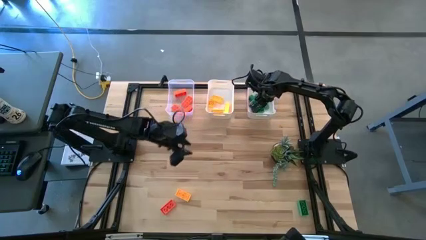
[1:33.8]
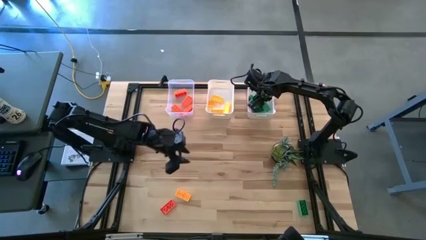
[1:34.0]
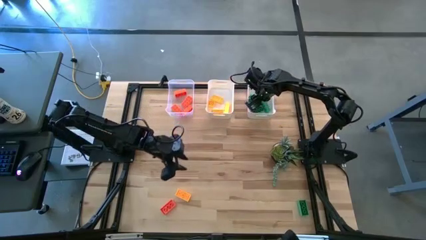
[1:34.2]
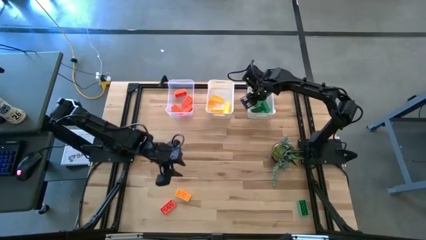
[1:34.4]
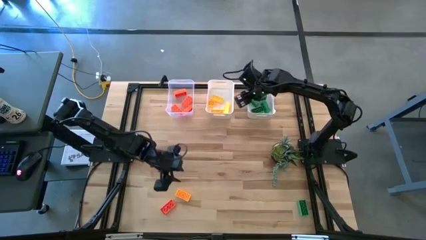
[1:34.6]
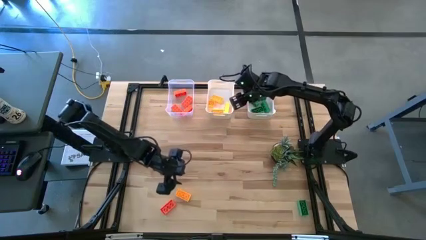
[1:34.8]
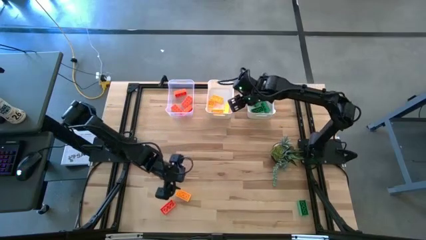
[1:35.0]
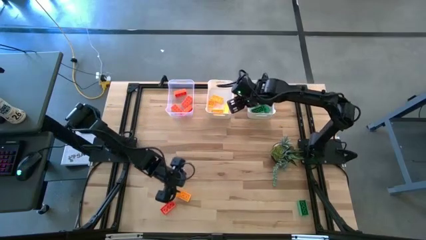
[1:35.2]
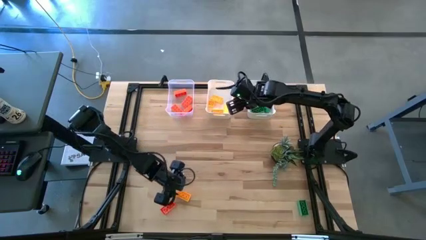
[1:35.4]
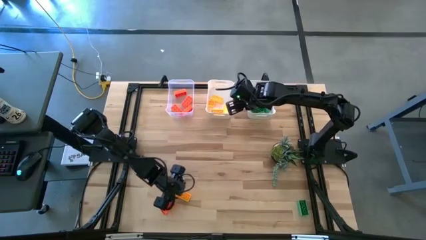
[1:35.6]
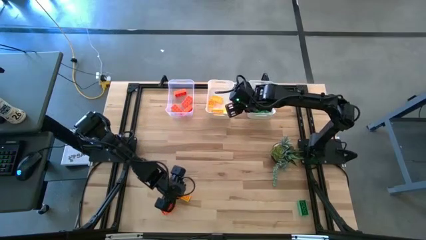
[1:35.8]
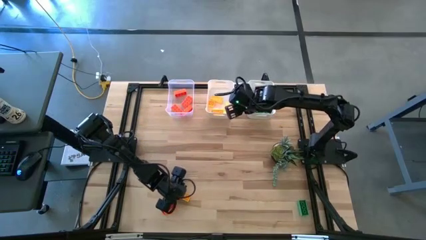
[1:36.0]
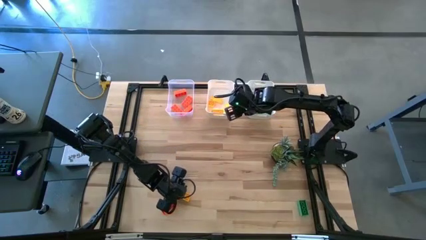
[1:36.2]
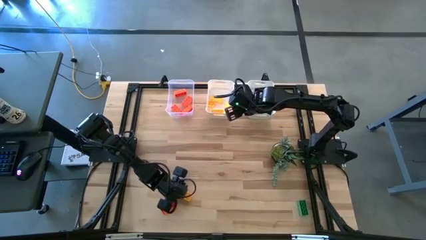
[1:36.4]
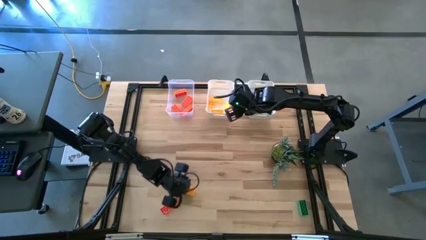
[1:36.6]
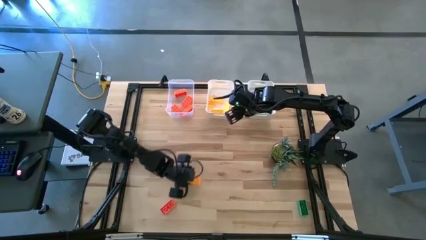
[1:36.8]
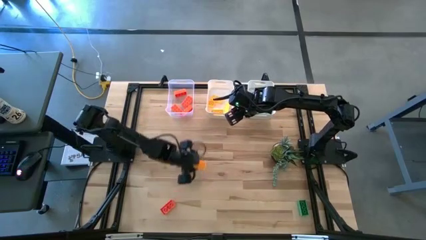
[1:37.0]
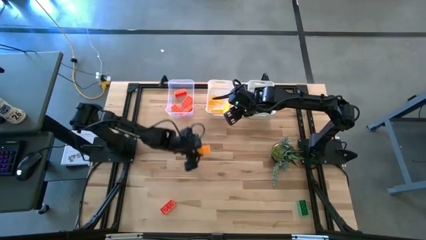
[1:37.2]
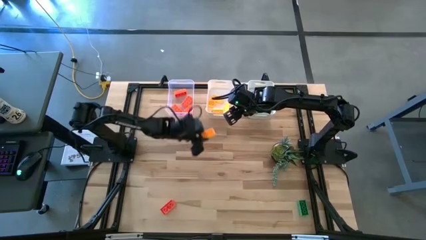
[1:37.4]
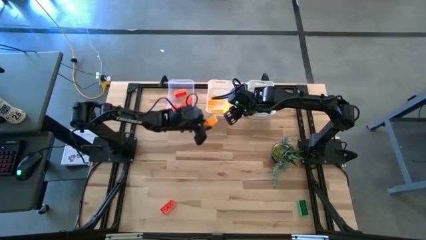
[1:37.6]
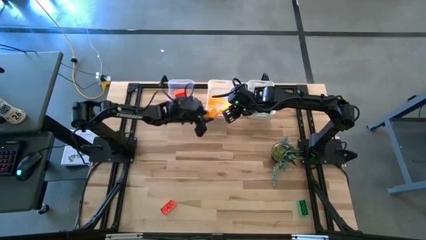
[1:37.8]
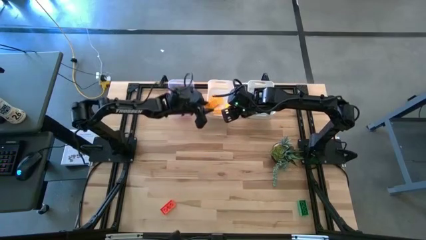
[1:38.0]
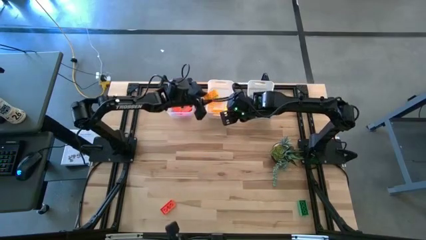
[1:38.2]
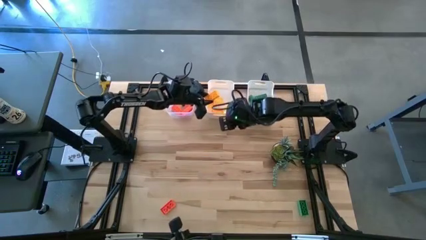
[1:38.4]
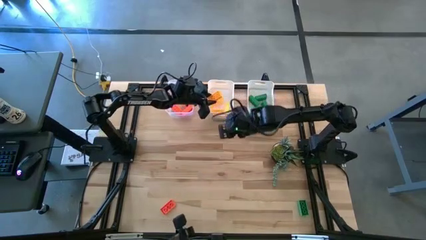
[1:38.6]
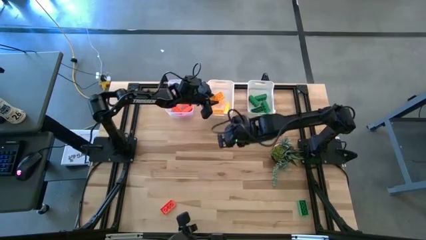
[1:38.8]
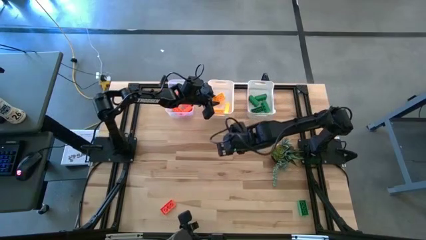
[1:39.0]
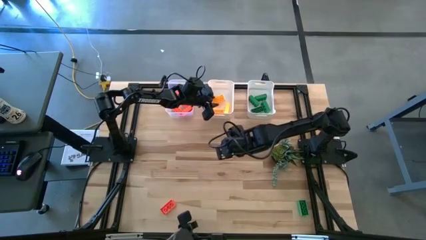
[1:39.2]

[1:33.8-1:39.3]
Task: Sort & place blocks by color
Put the yellow game piece into the left white bin

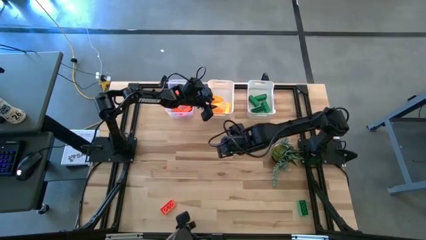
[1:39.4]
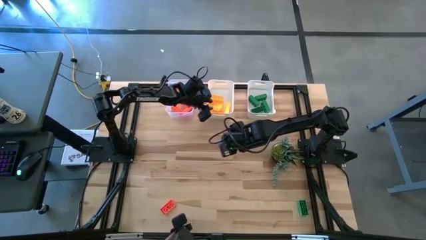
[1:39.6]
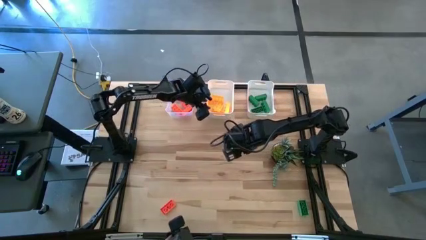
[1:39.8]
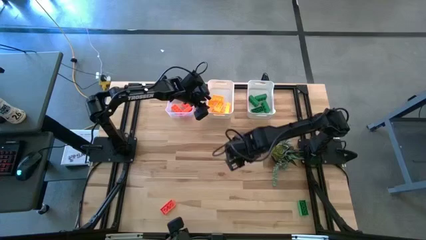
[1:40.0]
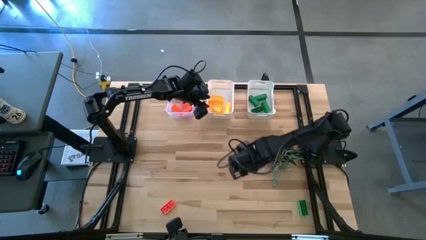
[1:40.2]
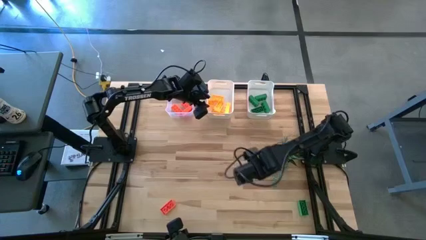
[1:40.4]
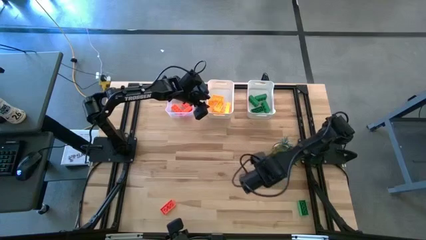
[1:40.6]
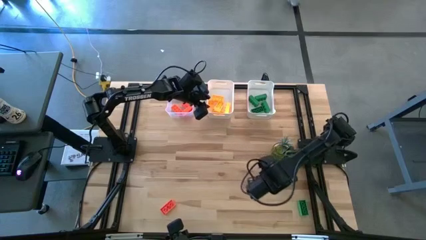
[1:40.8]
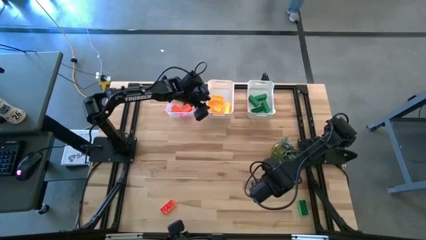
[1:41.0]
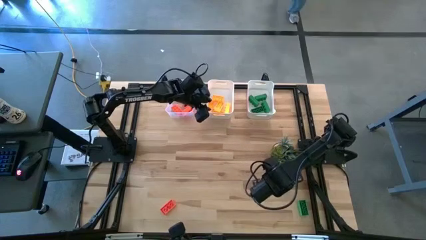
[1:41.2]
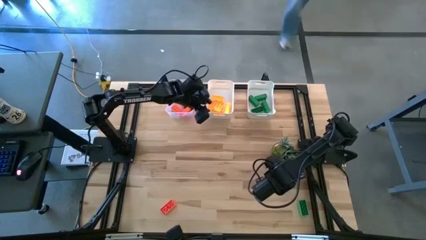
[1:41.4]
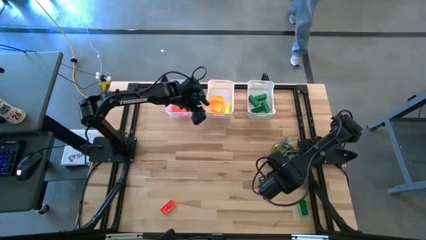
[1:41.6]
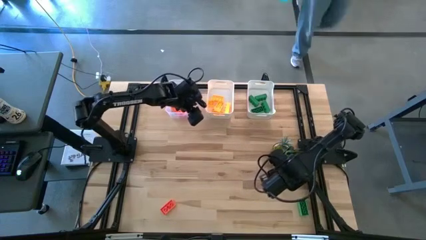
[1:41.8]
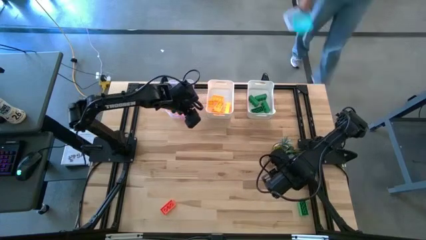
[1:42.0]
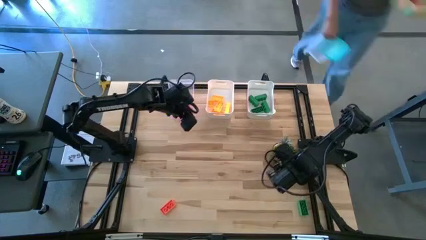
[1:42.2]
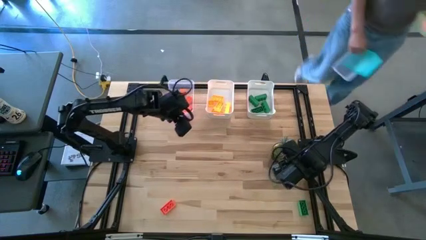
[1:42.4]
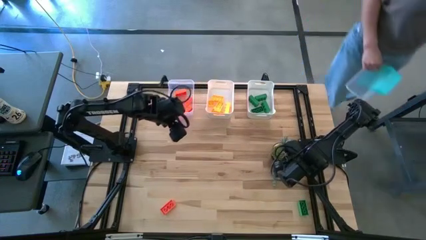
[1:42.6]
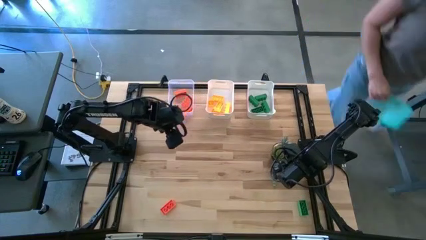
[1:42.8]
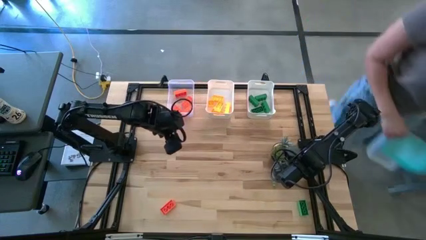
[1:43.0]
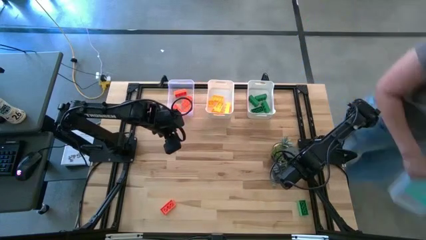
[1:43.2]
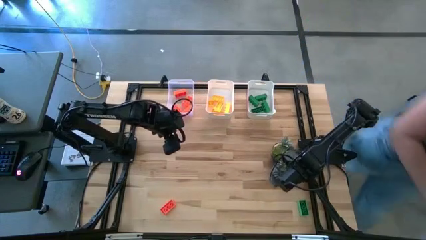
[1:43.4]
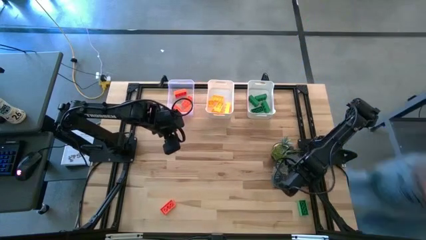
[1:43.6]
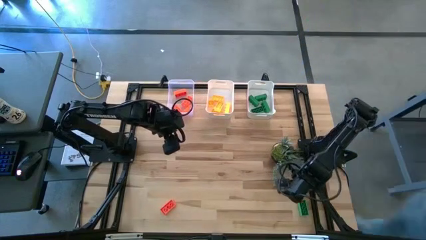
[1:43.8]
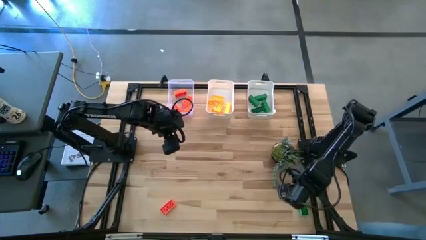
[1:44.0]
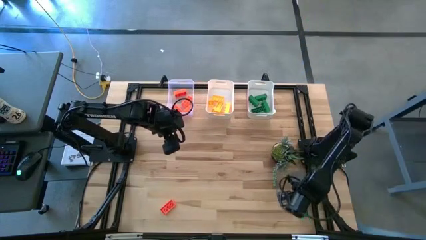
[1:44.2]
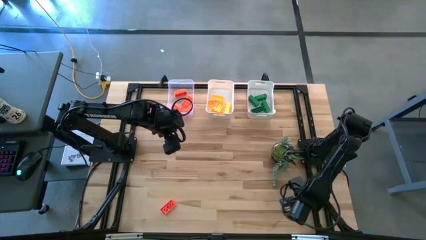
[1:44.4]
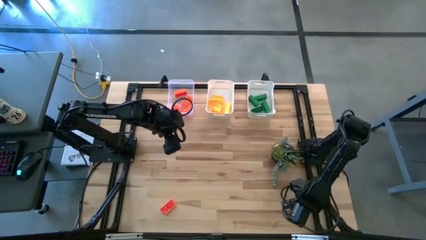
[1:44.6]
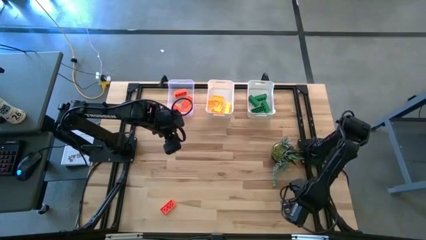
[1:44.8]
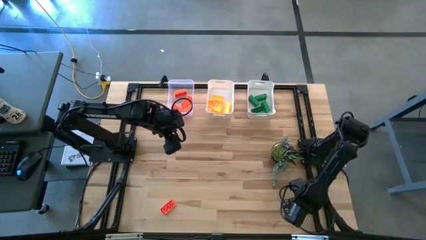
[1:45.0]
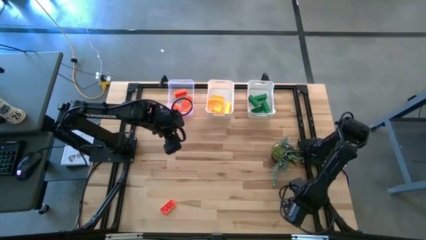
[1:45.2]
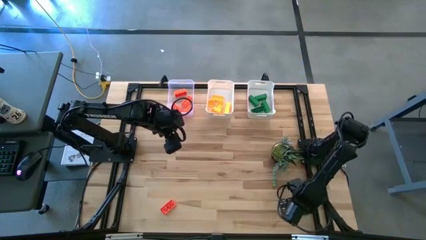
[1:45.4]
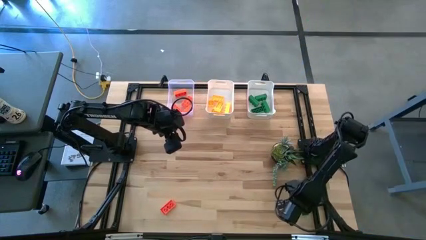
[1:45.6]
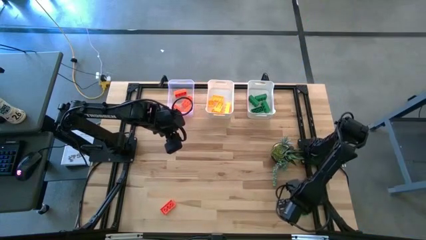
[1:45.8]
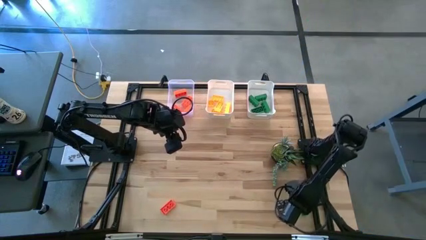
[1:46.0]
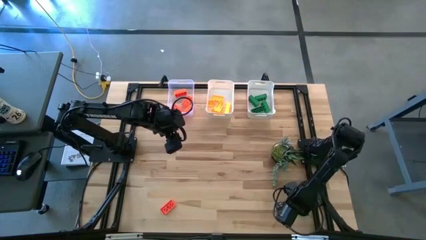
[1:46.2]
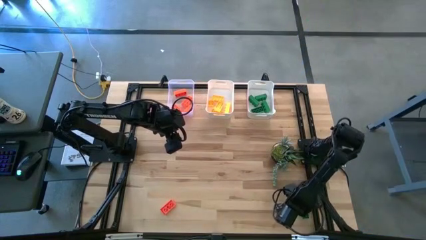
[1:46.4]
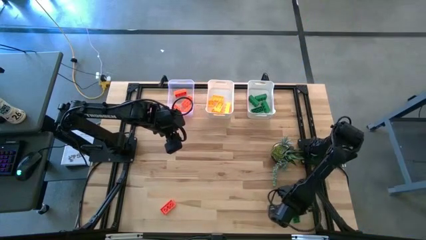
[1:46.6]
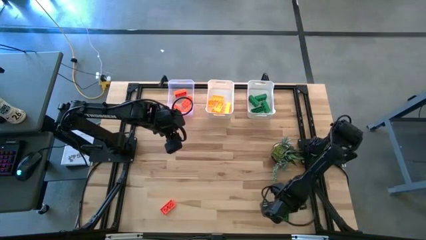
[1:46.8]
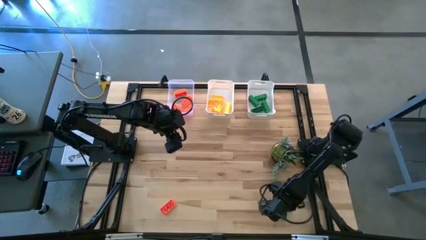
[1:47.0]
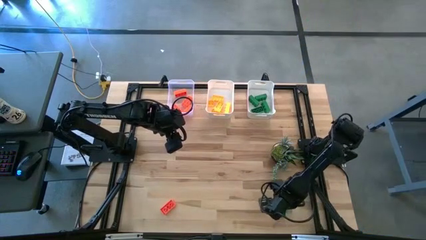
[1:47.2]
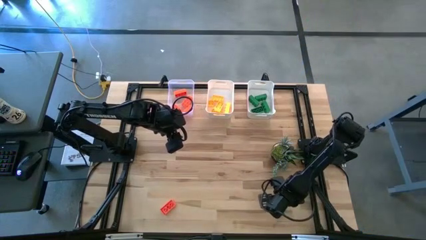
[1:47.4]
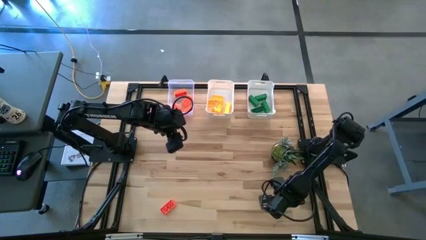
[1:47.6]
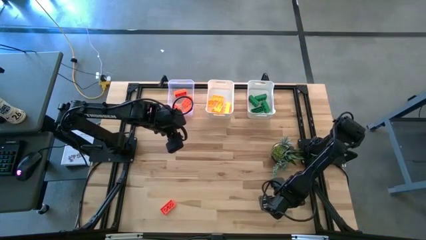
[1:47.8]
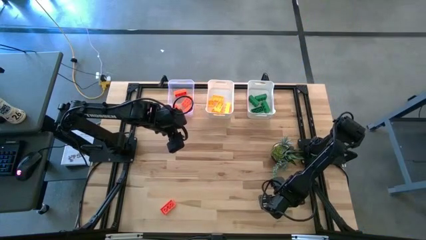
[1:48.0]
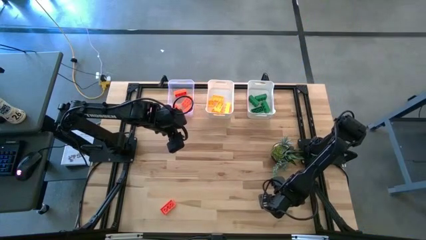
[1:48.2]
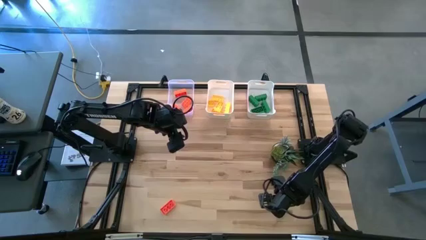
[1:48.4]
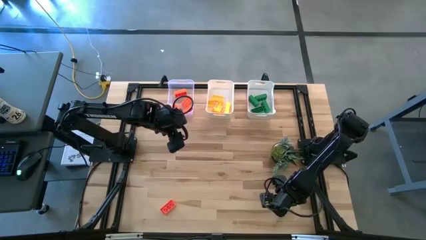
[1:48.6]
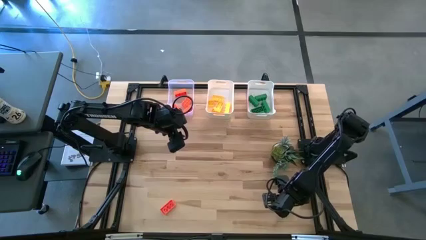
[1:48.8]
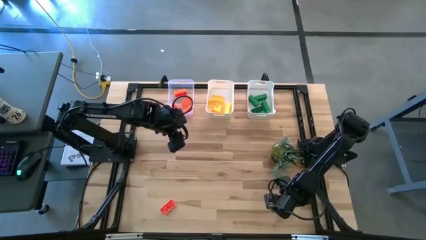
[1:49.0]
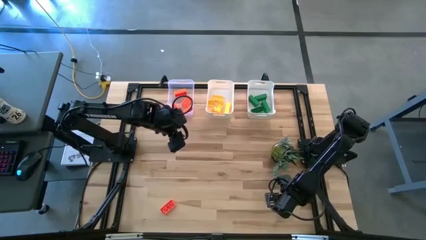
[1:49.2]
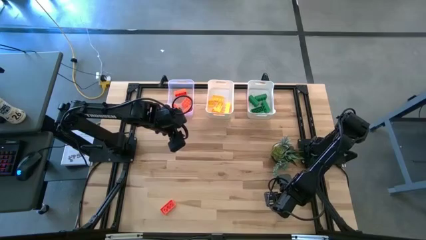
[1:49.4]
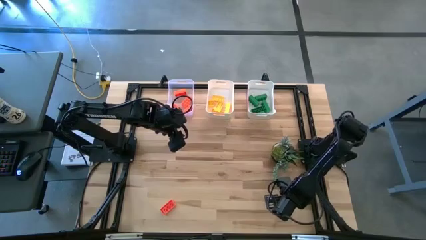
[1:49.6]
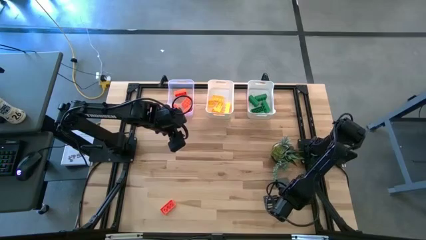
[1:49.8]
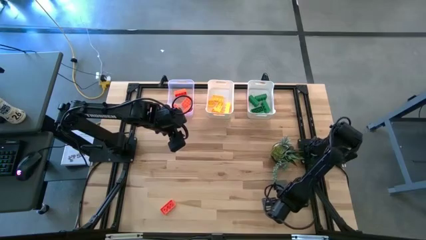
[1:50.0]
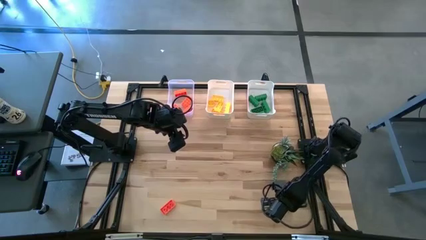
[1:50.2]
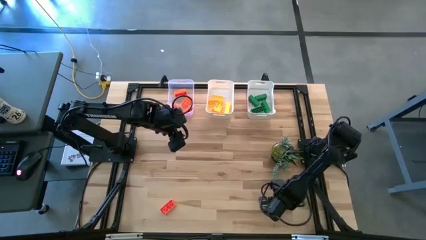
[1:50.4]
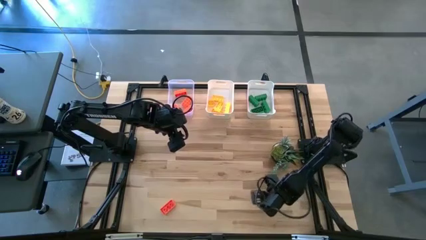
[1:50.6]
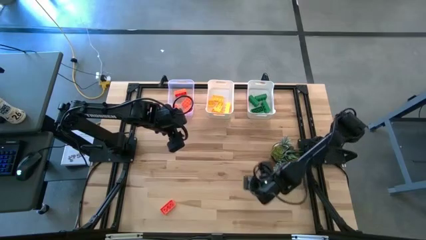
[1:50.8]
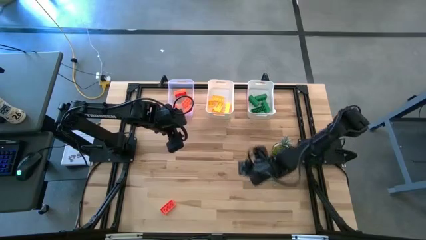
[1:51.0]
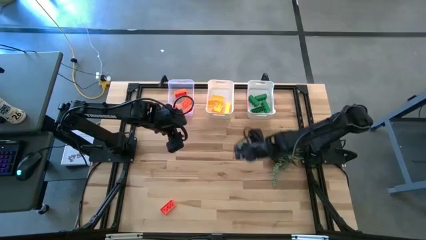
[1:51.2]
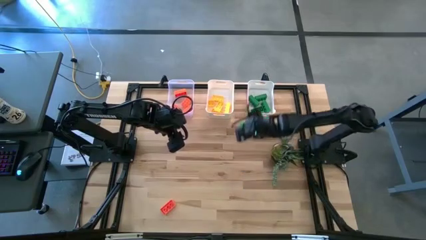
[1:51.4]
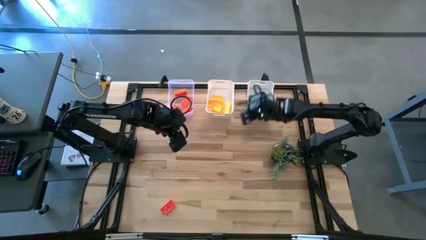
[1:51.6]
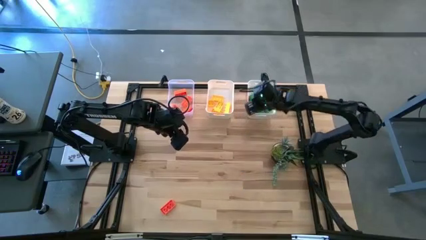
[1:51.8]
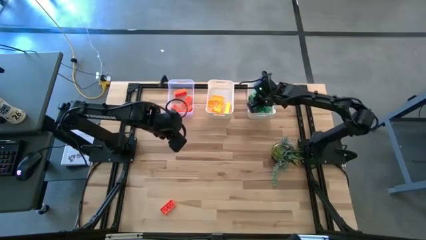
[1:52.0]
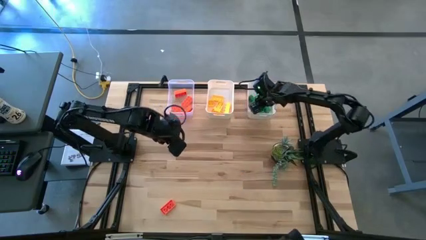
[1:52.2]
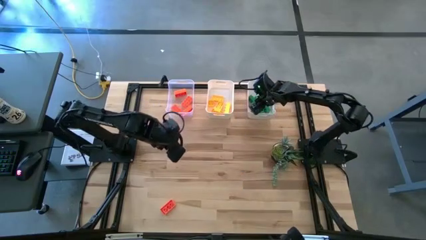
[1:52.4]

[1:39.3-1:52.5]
Put the green game piece into the right white bin
